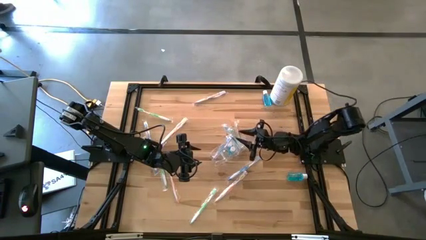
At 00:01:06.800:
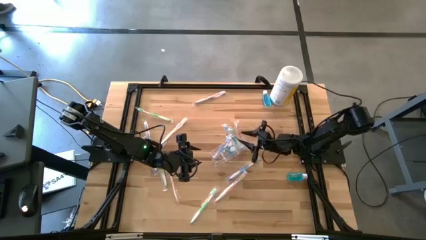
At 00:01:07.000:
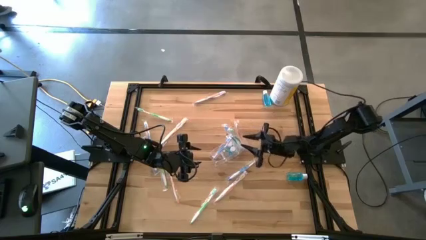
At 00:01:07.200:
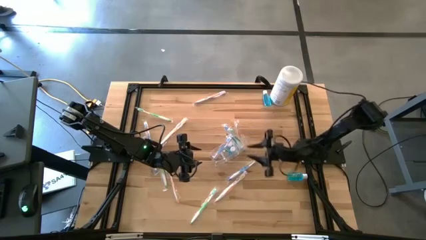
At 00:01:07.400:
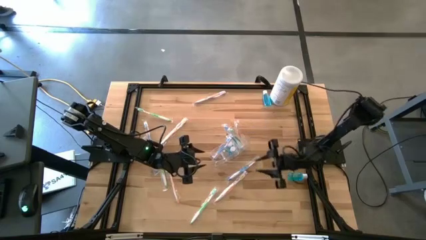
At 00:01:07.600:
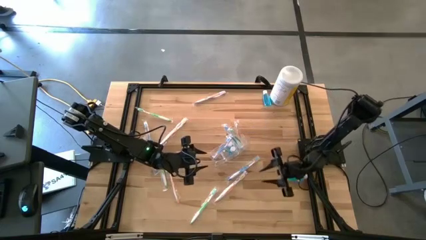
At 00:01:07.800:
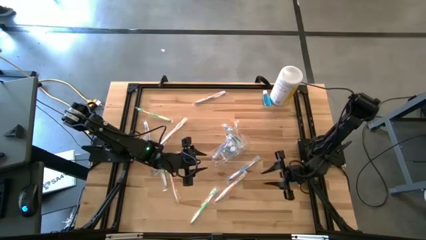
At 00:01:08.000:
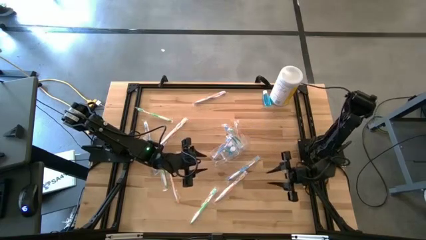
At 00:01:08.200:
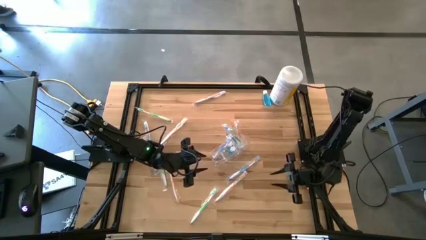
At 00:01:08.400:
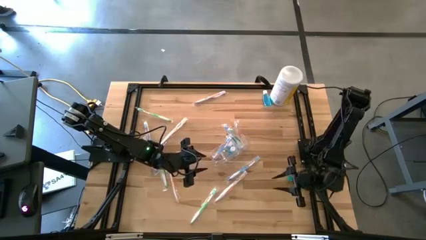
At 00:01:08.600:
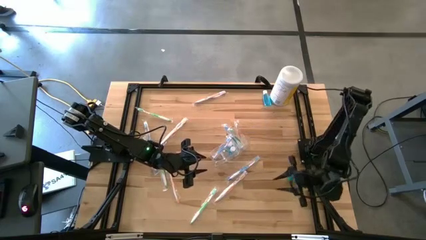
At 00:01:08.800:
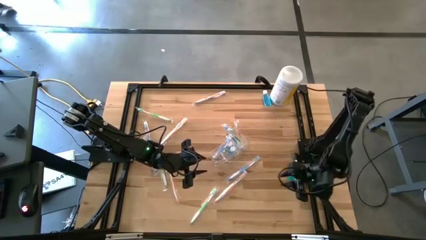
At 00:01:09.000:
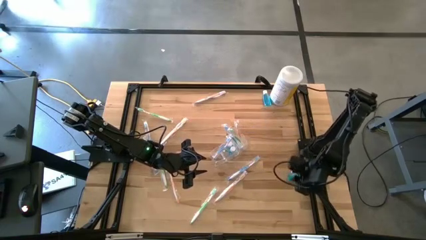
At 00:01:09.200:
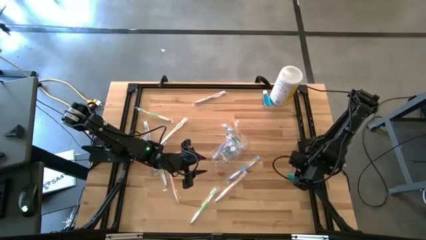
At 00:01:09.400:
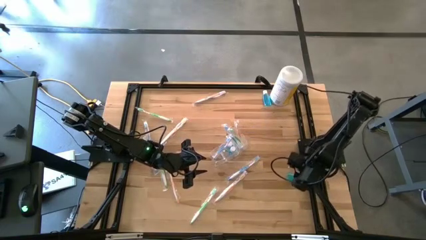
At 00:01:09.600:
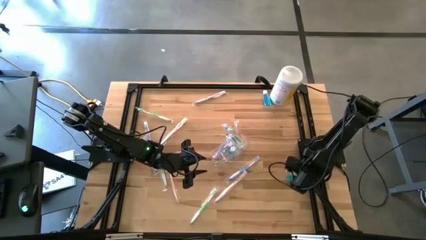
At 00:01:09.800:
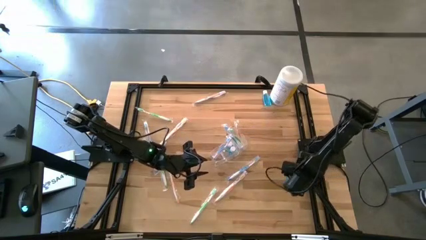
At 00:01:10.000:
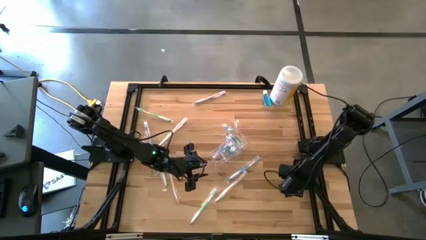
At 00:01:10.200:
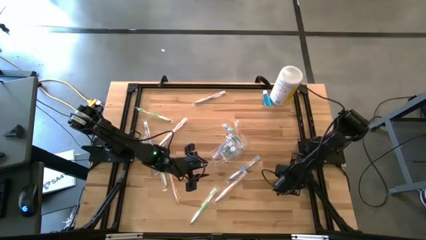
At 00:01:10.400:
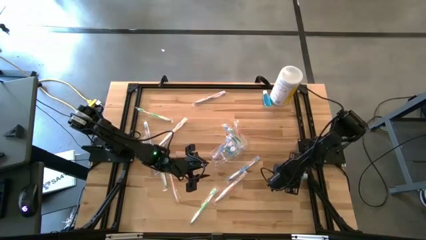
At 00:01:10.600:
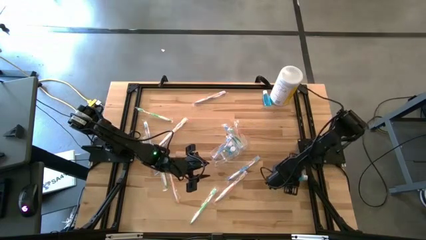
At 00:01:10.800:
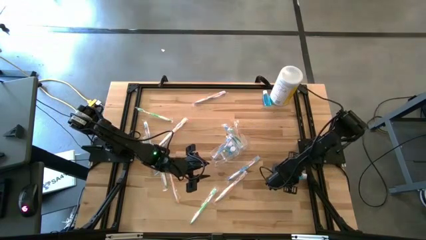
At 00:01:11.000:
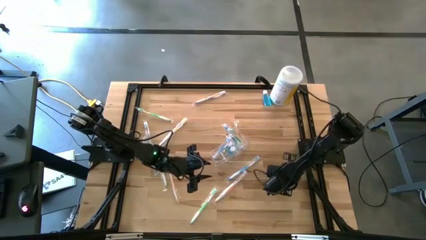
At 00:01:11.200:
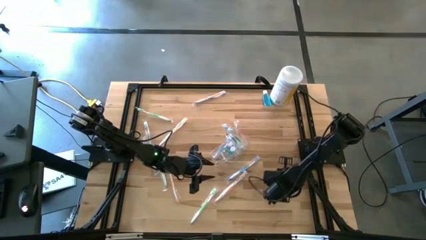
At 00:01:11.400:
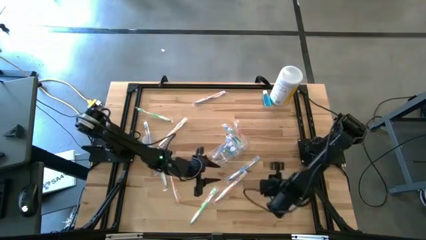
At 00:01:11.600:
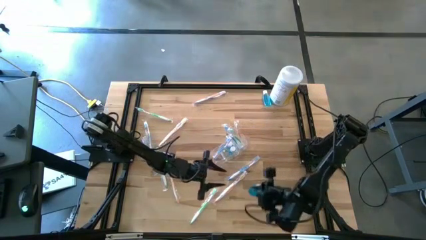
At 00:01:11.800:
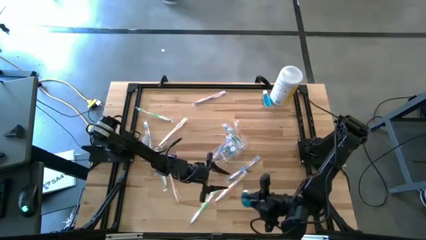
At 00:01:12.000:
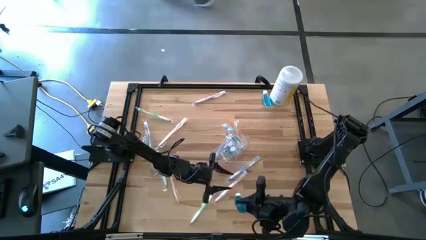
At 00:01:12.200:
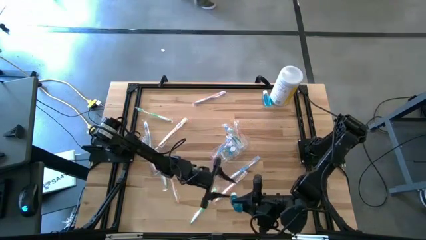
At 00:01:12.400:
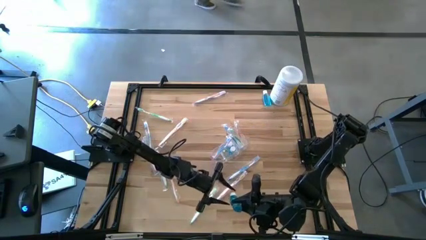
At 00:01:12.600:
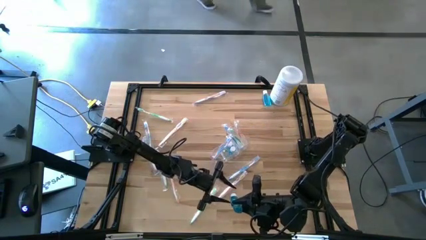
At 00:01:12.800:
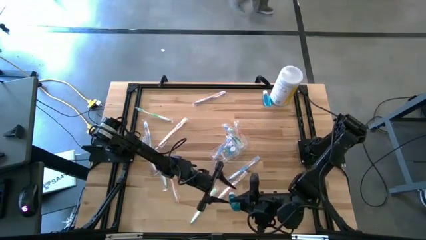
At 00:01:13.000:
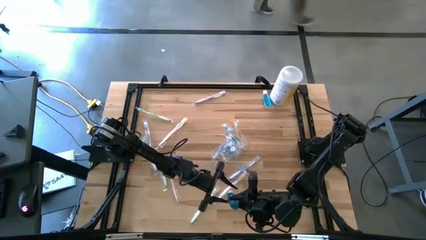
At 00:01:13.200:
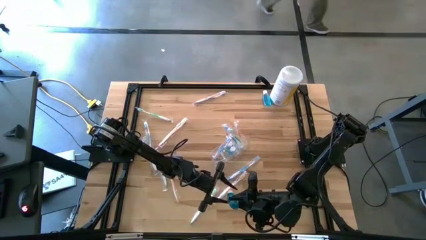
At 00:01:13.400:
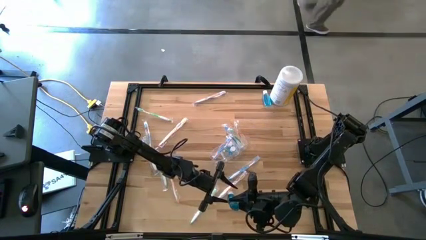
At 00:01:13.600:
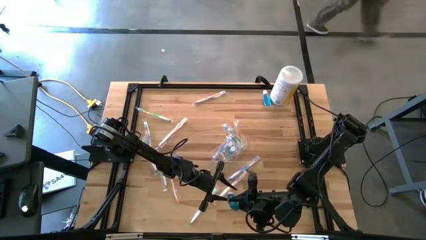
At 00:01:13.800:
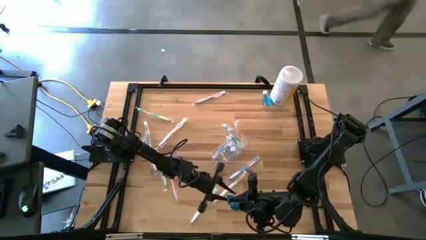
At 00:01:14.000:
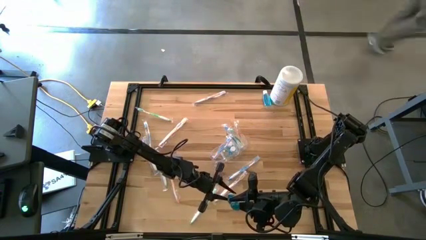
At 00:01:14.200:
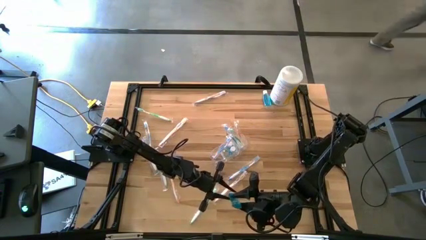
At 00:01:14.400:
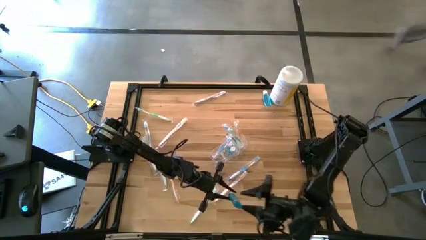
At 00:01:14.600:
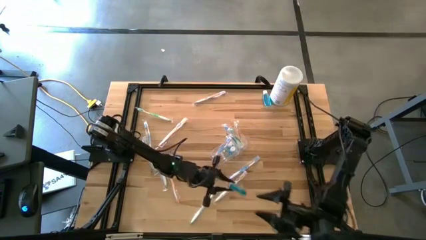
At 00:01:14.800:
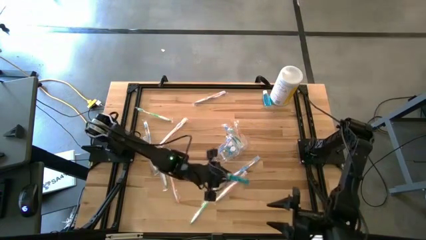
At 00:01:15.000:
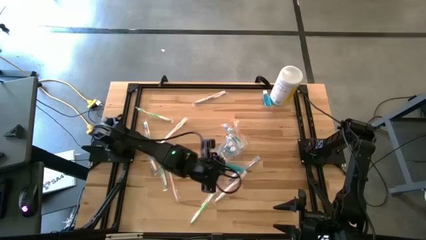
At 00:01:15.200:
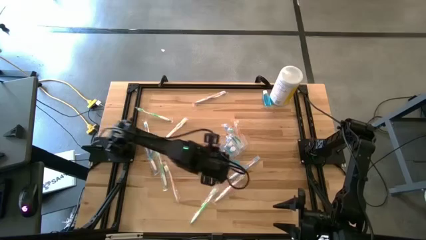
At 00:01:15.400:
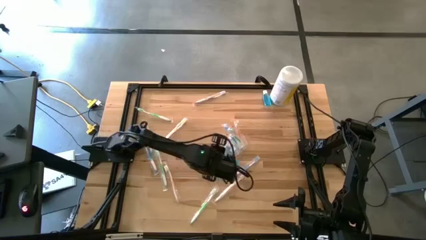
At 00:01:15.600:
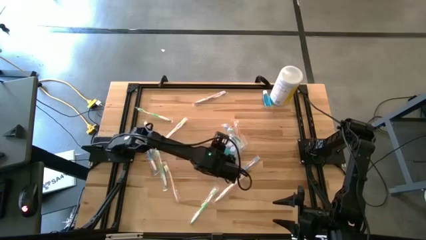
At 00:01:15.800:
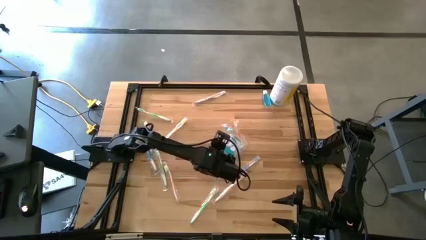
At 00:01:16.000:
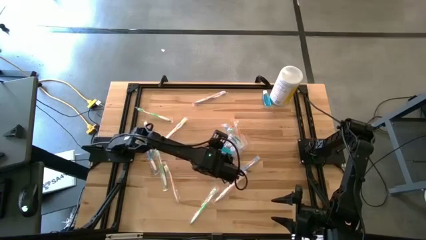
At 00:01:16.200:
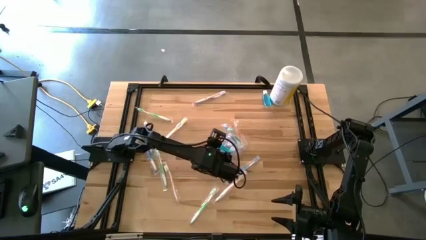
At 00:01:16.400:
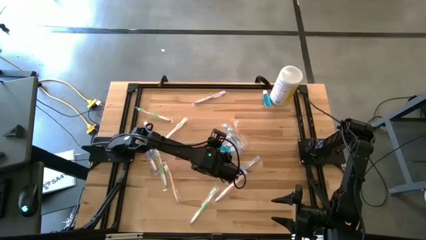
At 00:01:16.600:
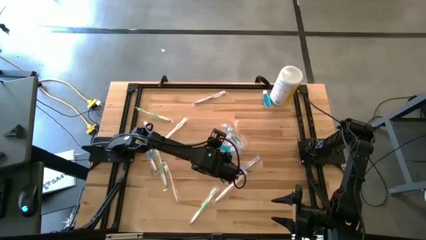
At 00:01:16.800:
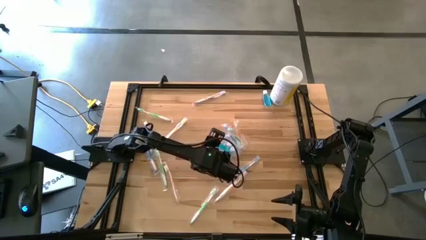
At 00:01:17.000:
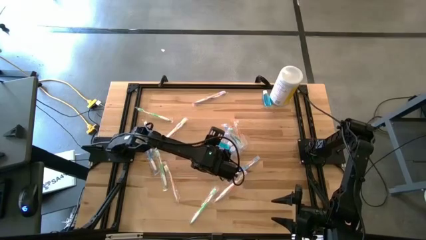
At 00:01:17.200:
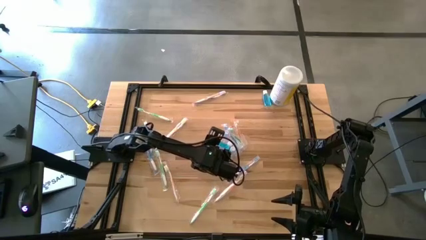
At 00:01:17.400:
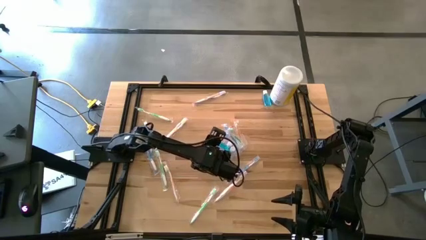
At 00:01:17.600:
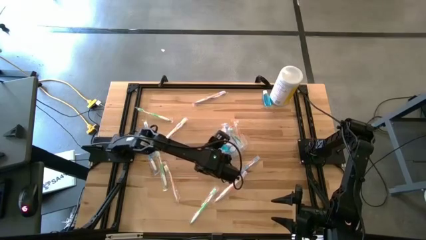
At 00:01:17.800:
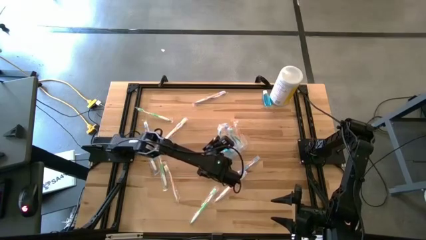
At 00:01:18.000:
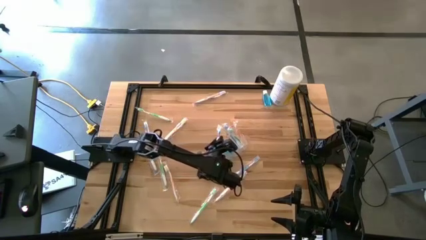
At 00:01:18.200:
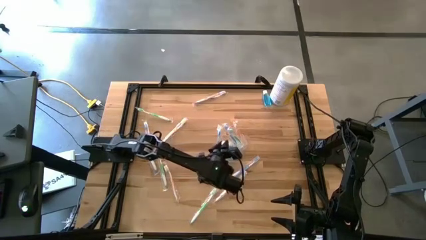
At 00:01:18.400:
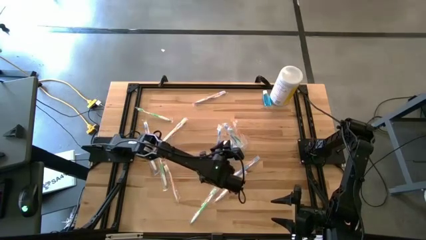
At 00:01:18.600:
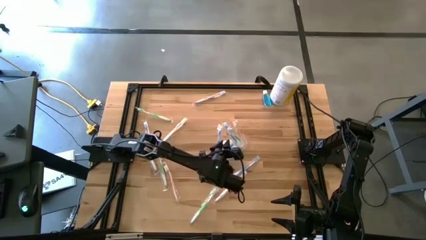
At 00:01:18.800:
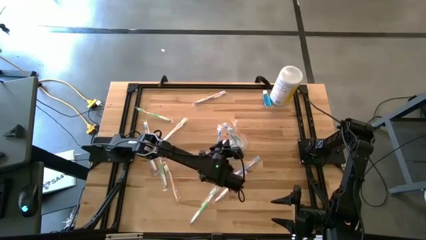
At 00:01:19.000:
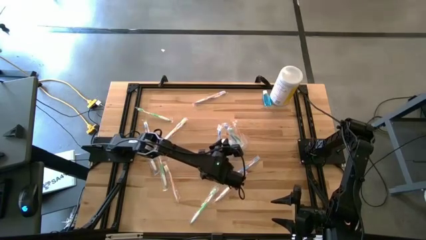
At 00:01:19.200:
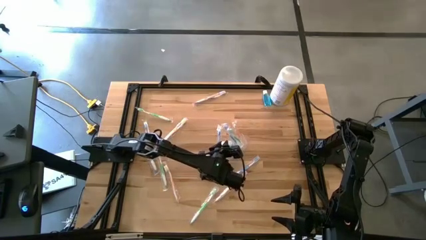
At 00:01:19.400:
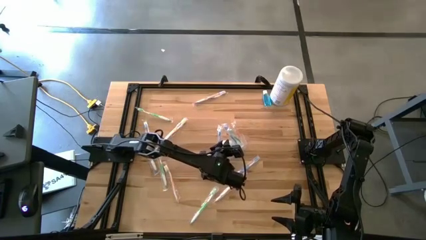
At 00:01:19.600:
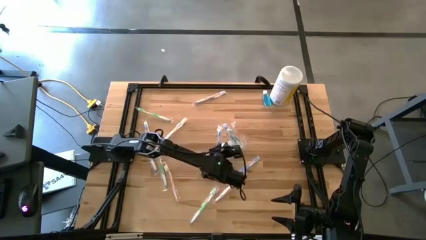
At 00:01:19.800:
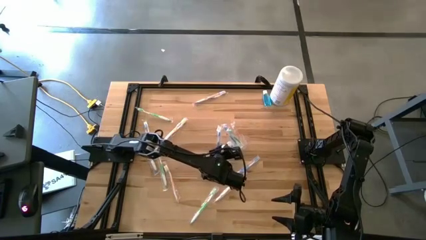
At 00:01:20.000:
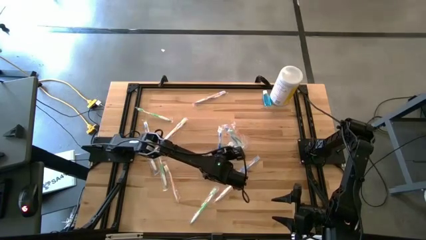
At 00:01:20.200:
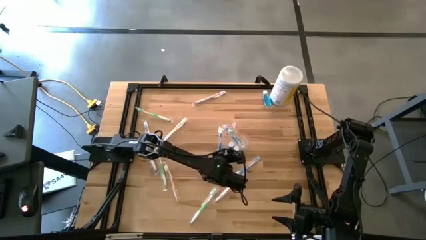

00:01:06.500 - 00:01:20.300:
Task: Pick & Place toothbrushing station
Put the blue mouthwash into the transparent organizer
